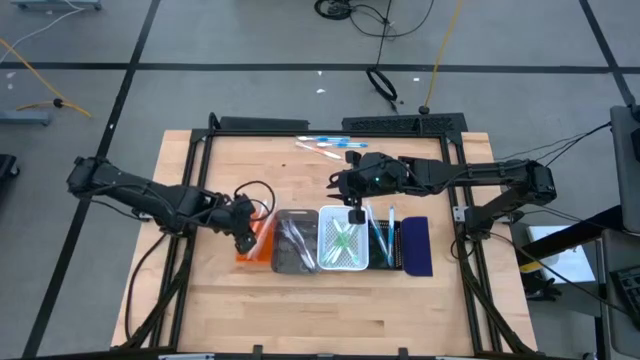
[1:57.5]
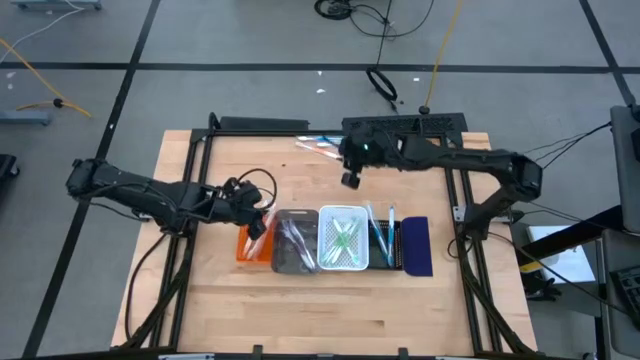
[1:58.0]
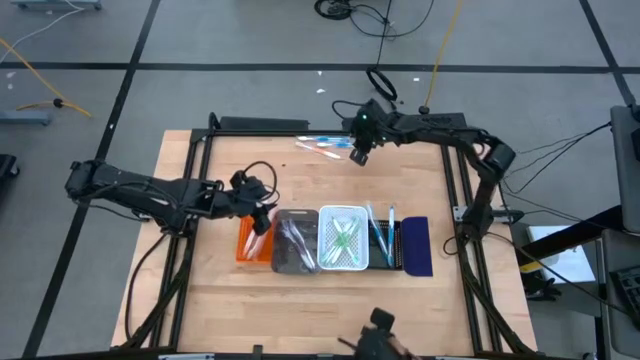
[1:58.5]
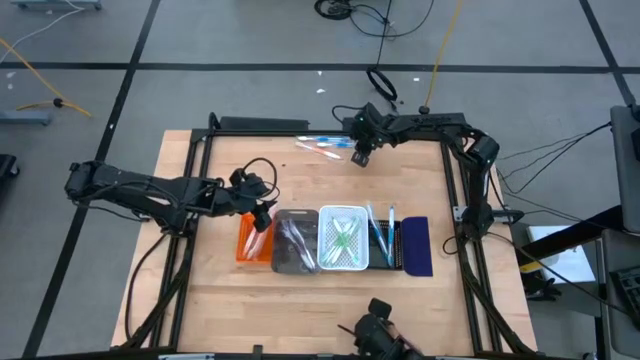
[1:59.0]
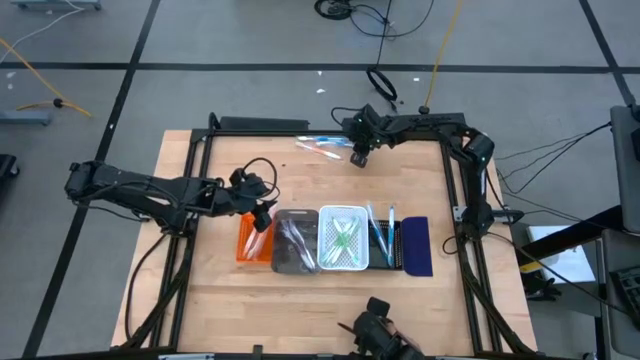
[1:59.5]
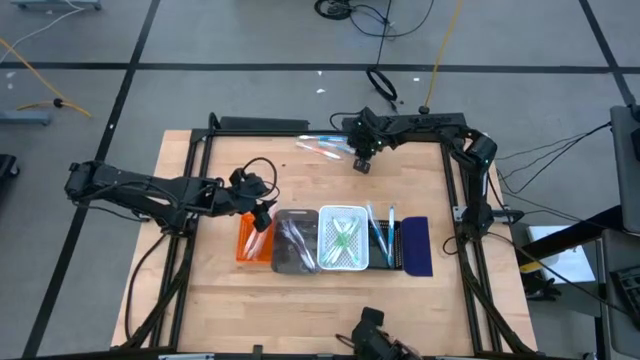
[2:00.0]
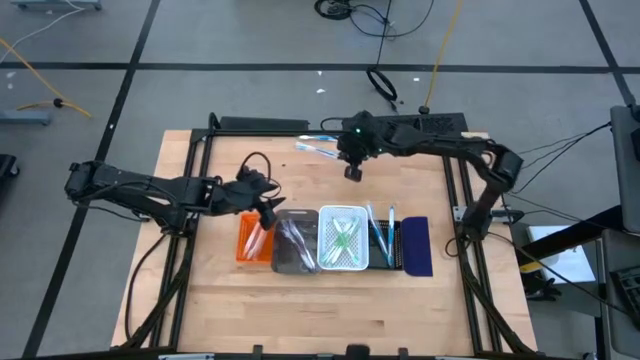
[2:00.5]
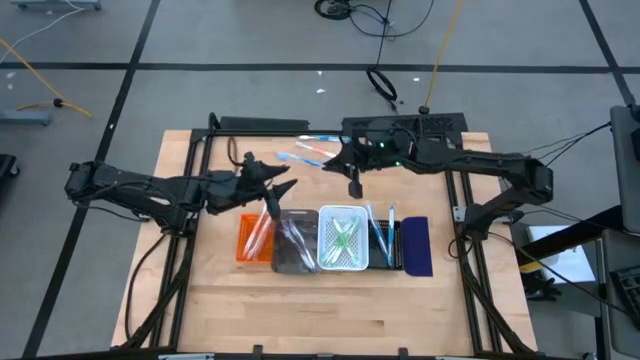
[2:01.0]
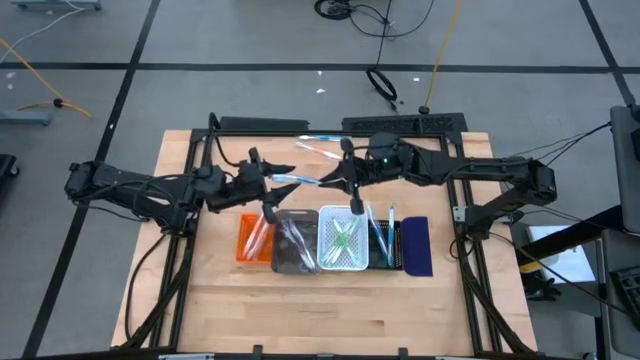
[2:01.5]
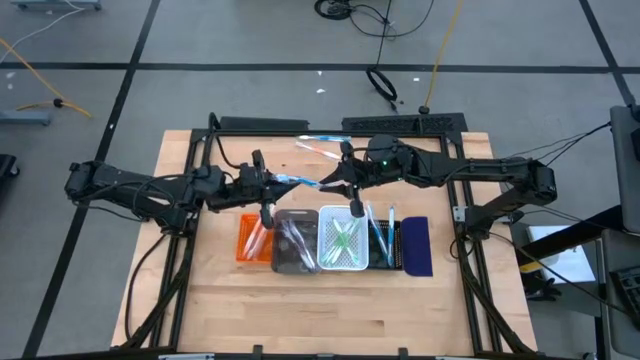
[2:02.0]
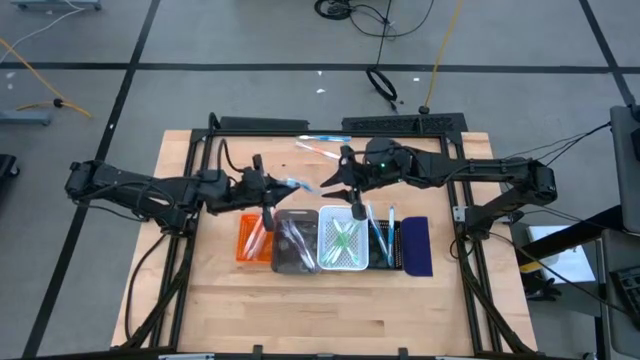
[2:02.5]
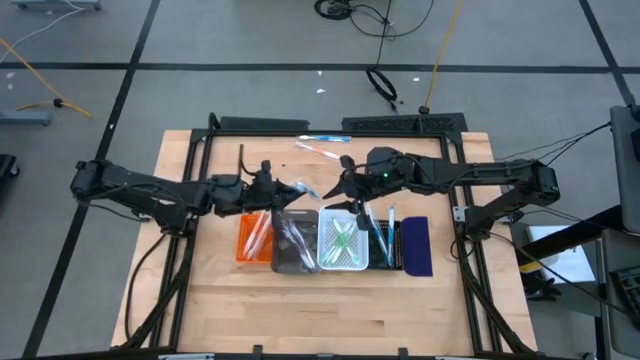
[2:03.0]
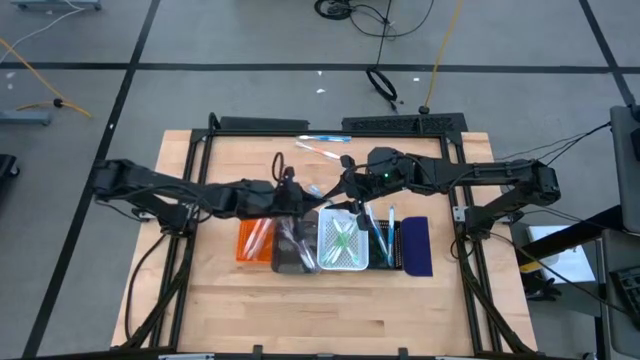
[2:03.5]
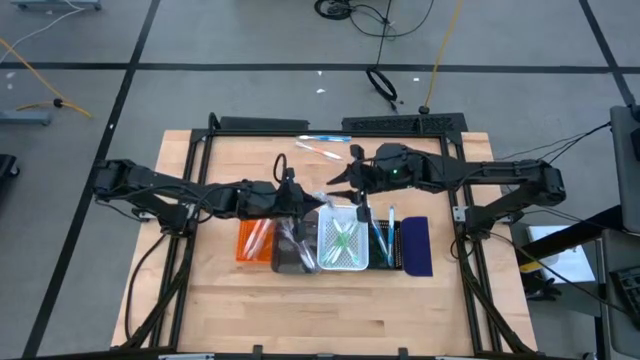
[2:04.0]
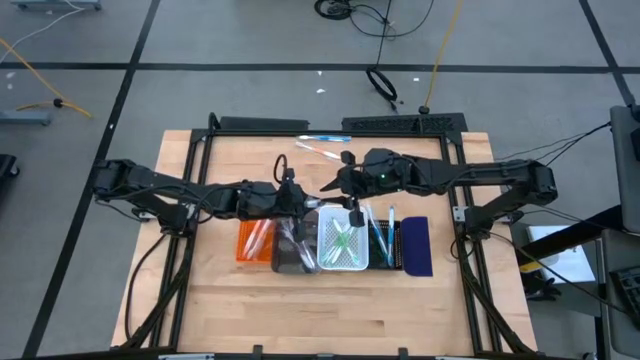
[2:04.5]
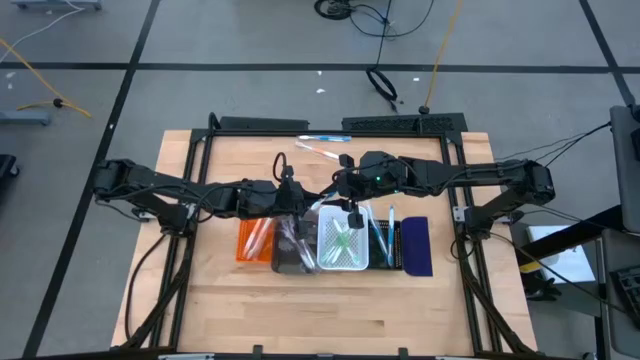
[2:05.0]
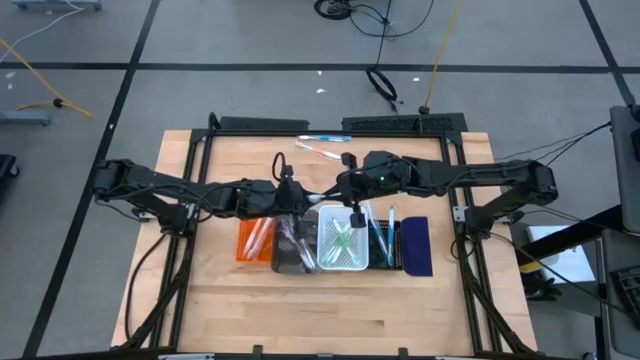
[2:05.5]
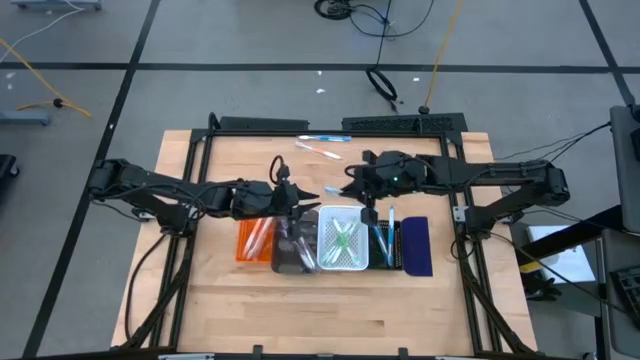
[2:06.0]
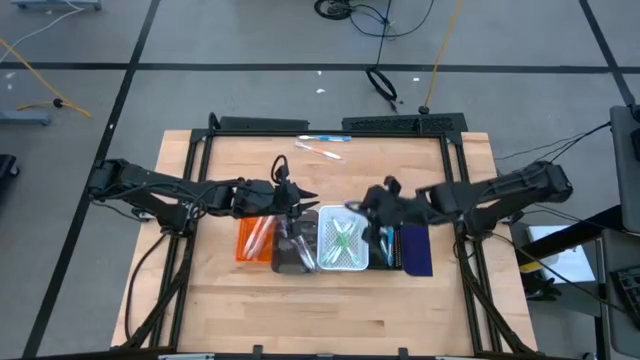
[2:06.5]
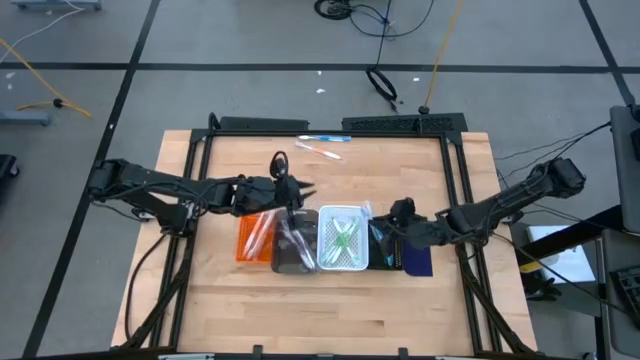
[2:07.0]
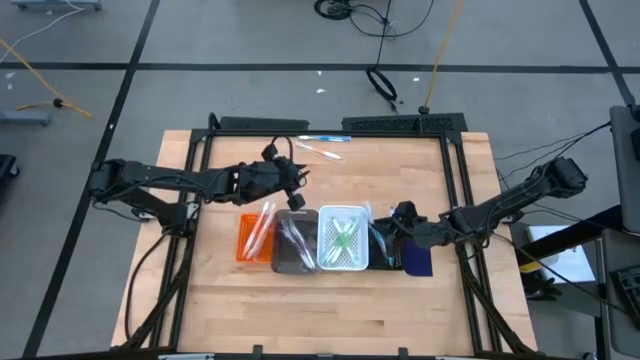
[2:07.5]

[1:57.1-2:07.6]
Task: Pick & Place Toothbrushes
Put the blue toothbrush into the right black bin

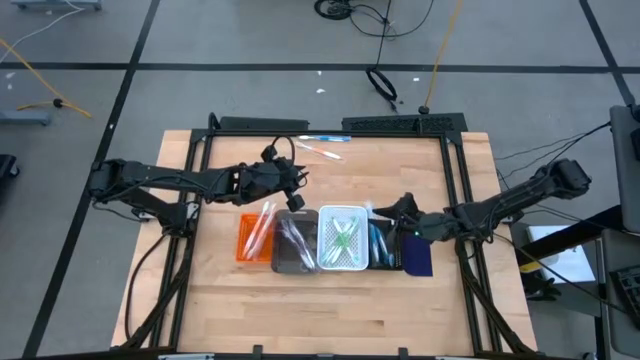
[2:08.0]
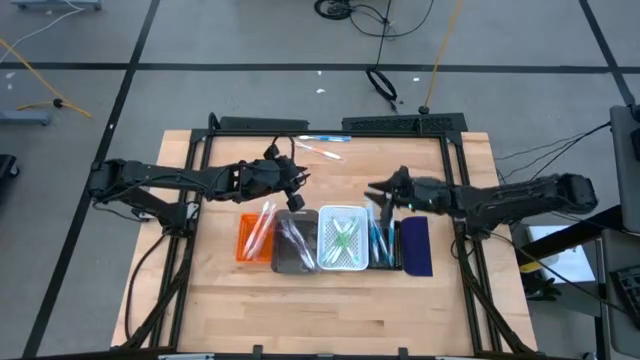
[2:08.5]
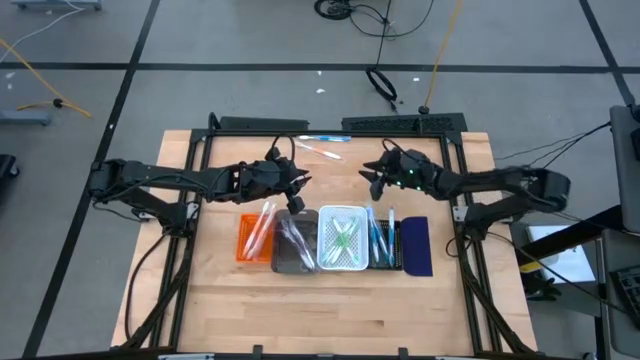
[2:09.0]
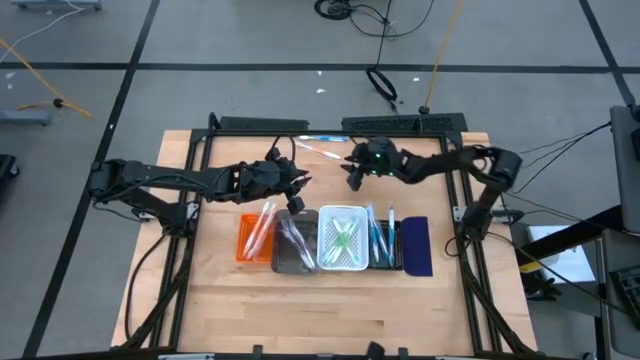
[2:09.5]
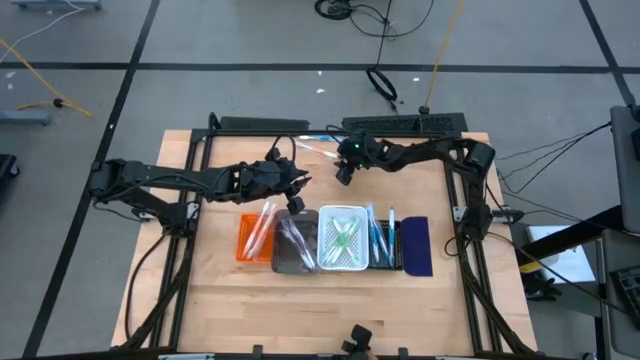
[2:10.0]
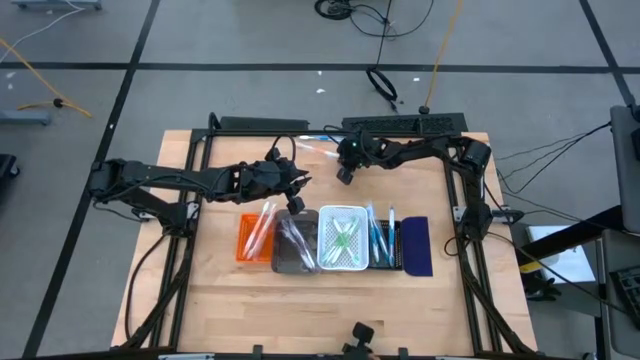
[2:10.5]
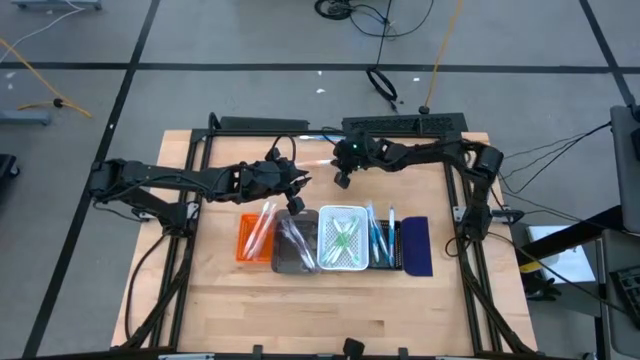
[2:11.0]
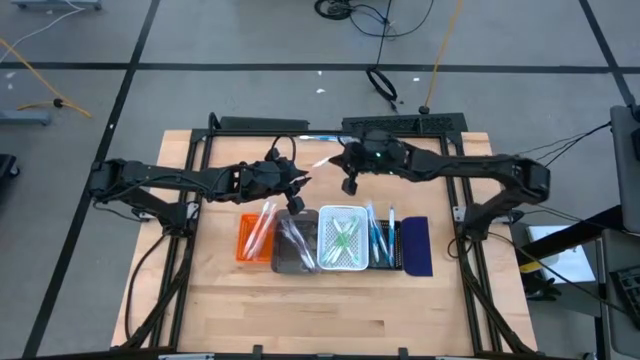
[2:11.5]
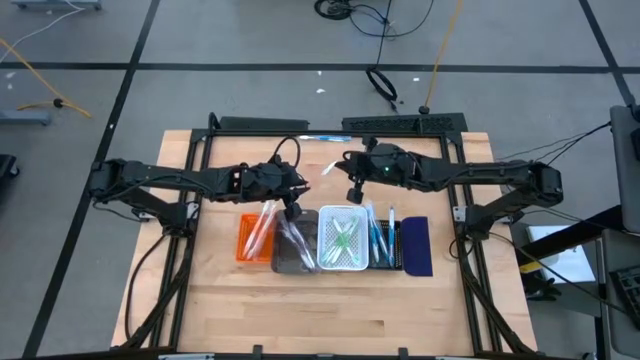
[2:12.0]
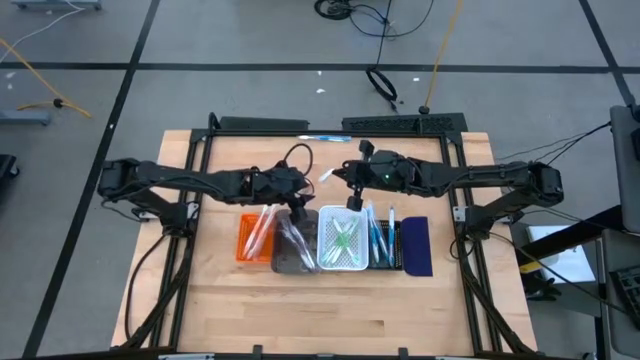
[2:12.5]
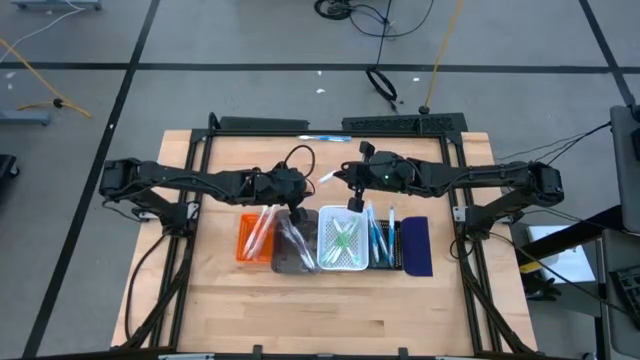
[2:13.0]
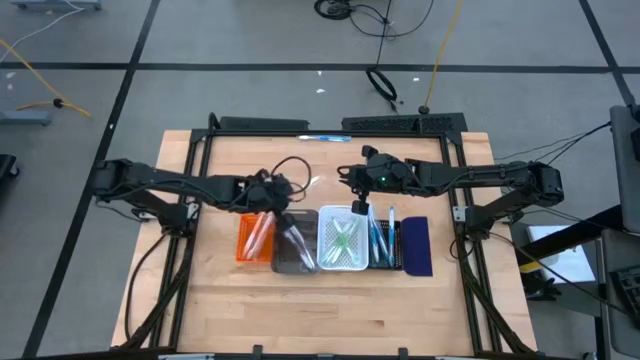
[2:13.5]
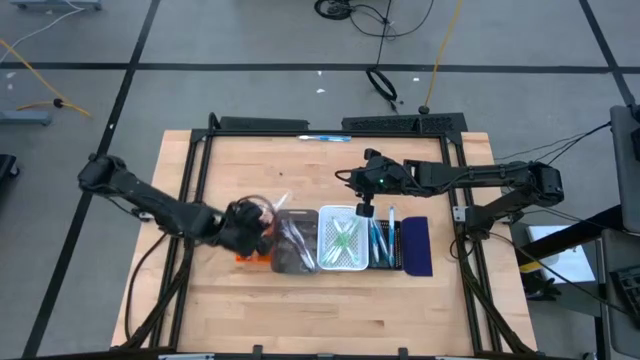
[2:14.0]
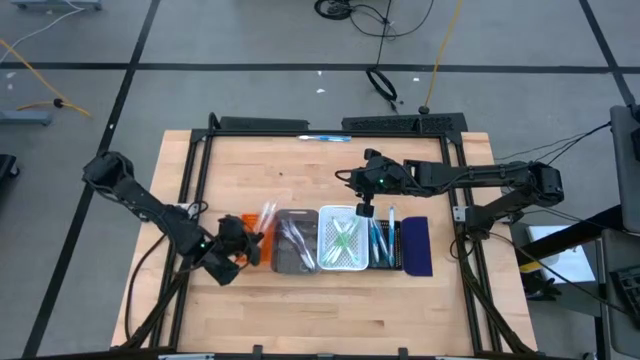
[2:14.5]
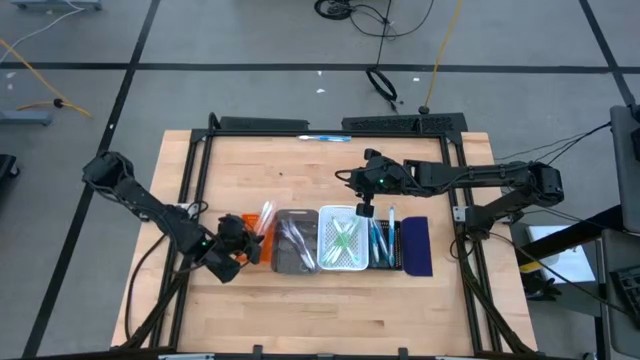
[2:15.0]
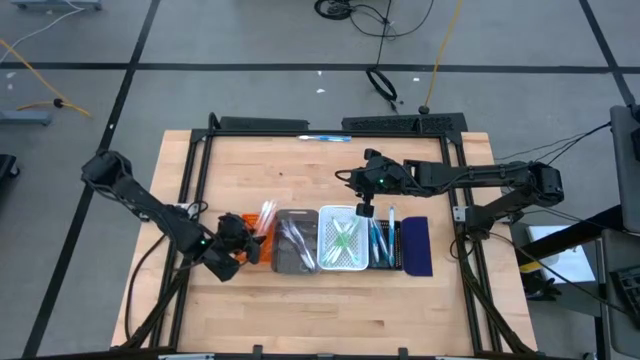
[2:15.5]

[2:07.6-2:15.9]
Put the orange toothbrush into the orange bin

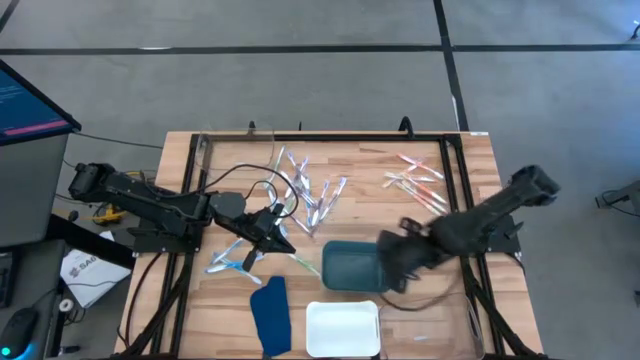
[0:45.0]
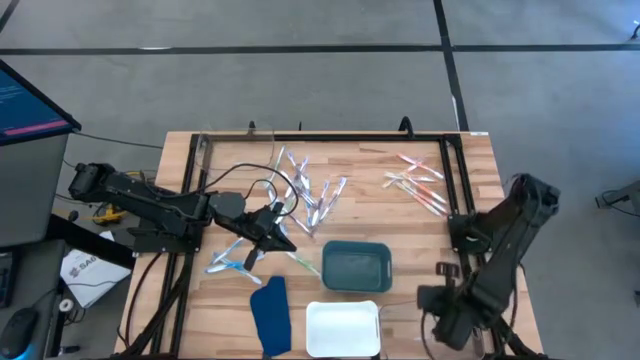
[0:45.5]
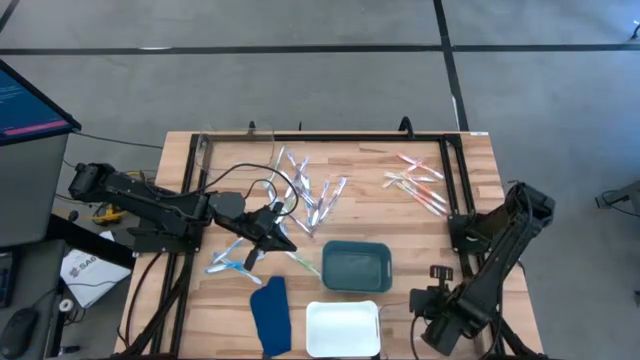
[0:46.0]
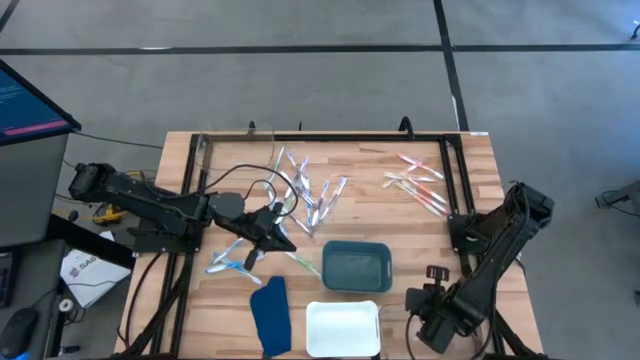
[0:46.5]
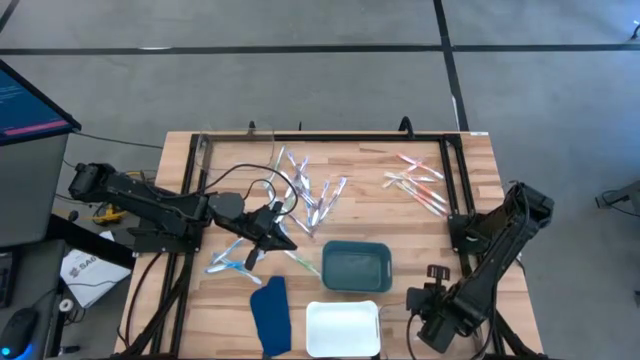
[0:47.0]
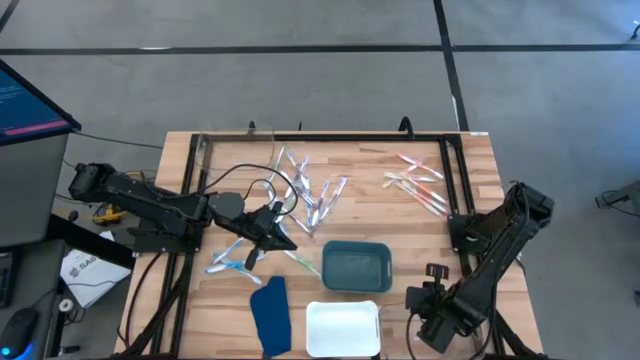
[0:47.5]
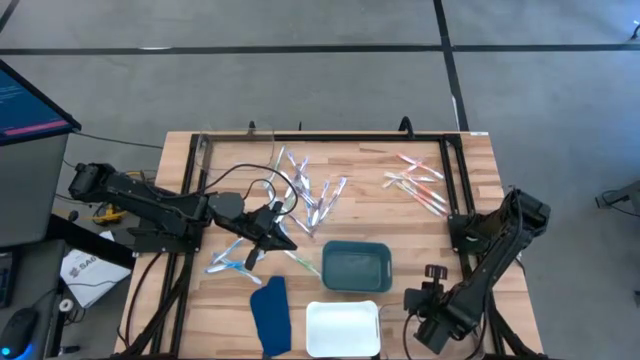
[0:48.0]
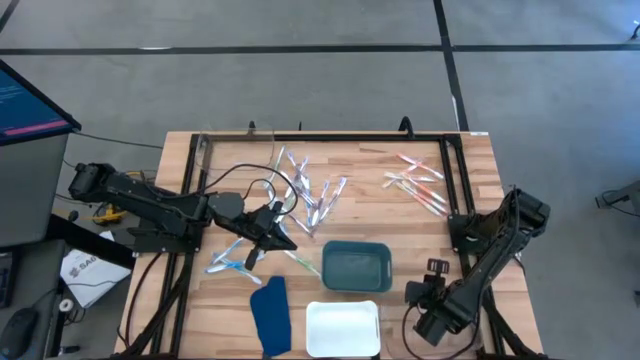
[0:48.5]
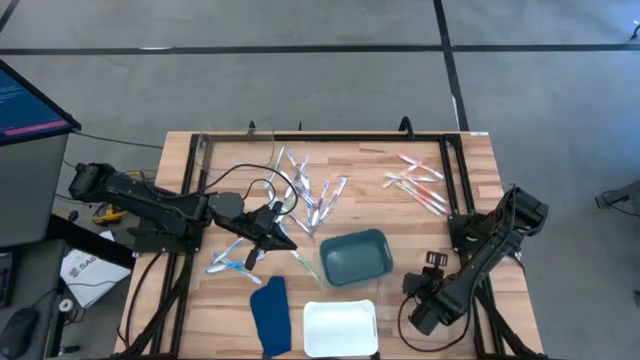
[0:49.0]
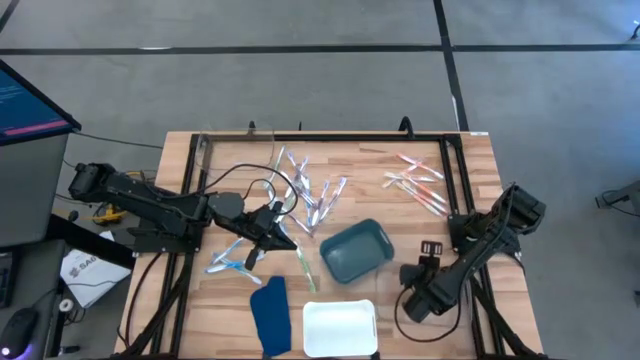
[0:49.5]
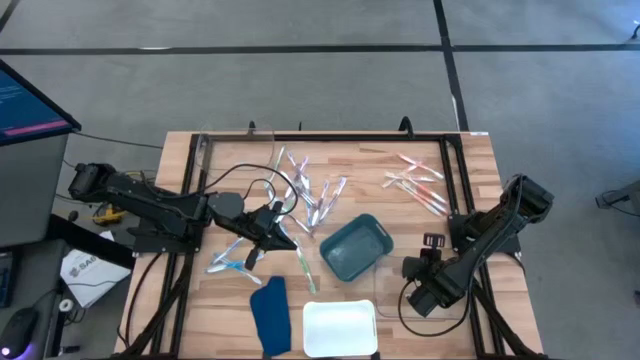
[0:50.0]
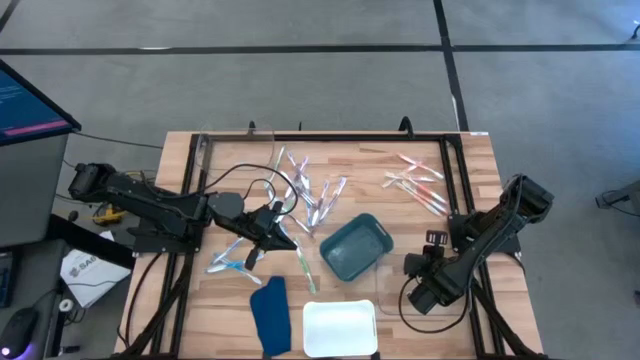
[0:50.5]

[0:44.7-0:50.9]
Task: Pick & Place Toothbrushes
Move the transparent bin to the middle right of the table
